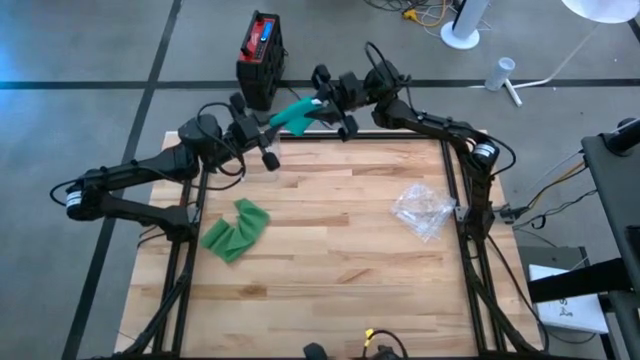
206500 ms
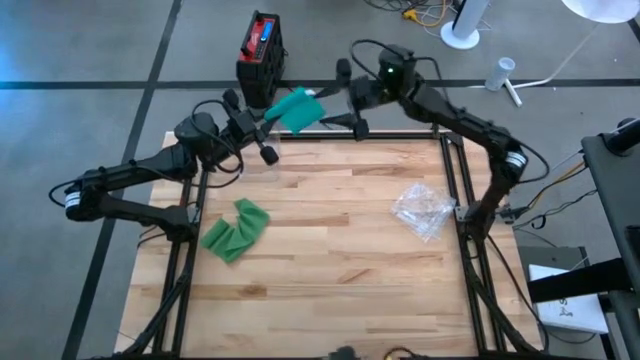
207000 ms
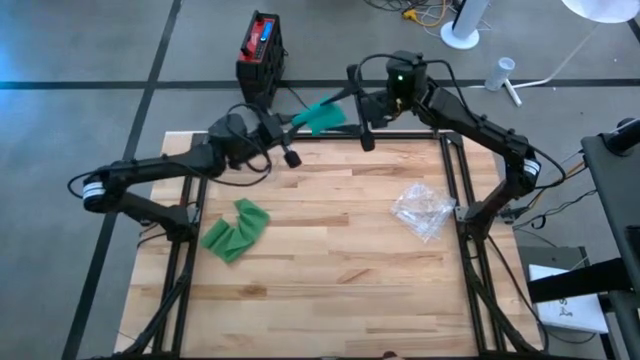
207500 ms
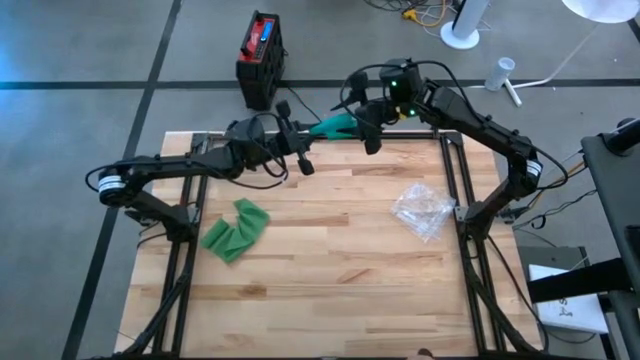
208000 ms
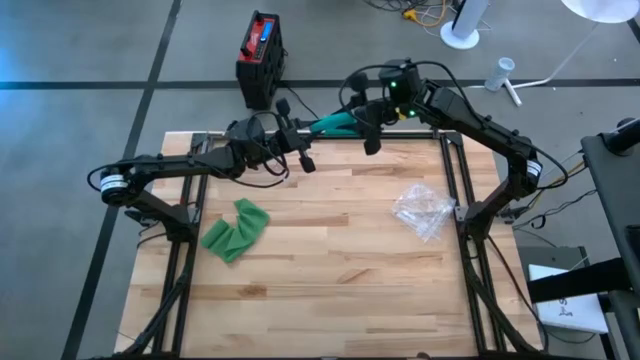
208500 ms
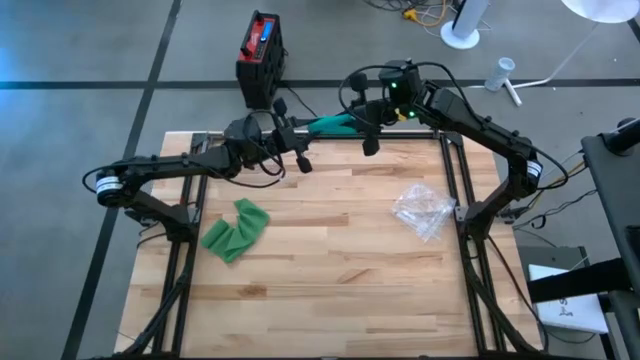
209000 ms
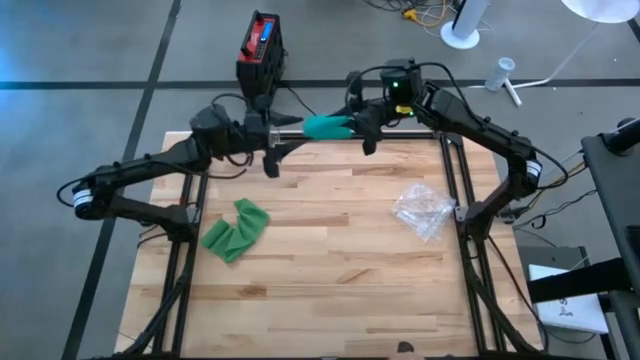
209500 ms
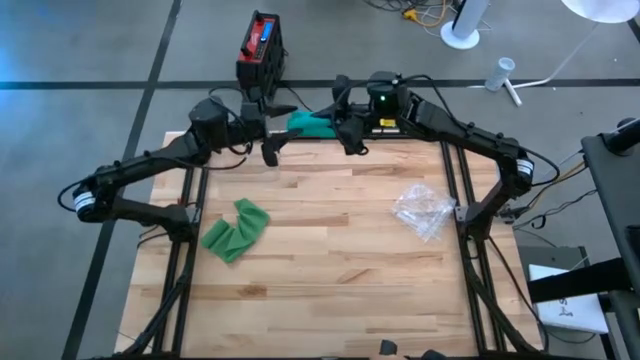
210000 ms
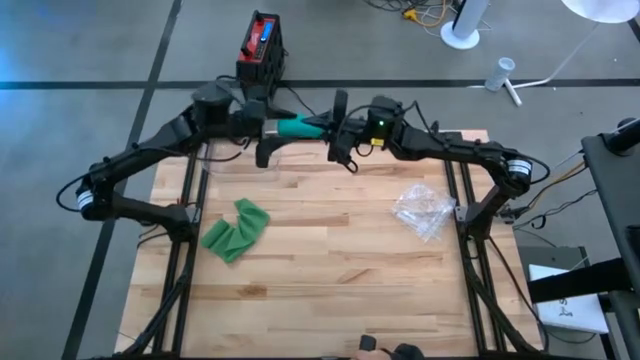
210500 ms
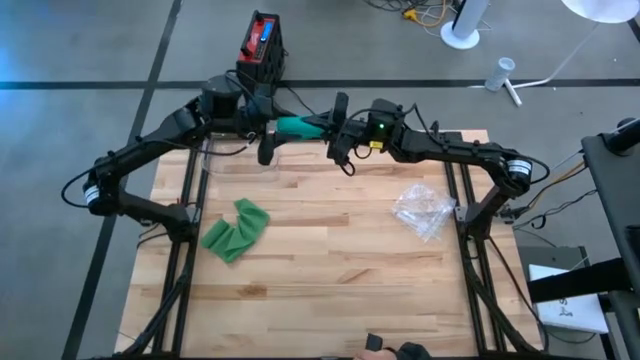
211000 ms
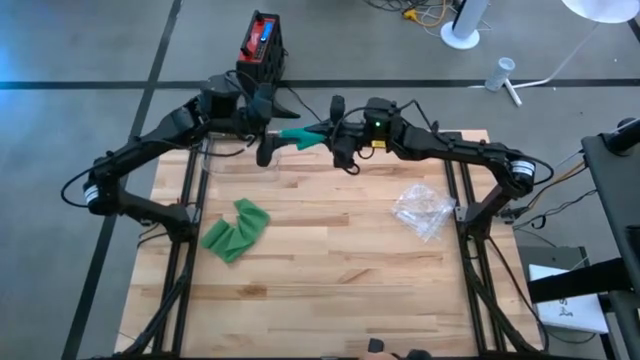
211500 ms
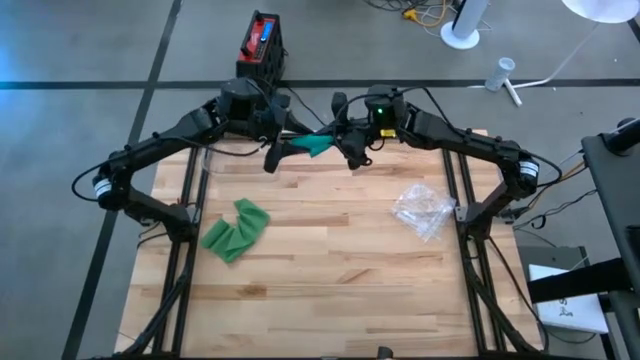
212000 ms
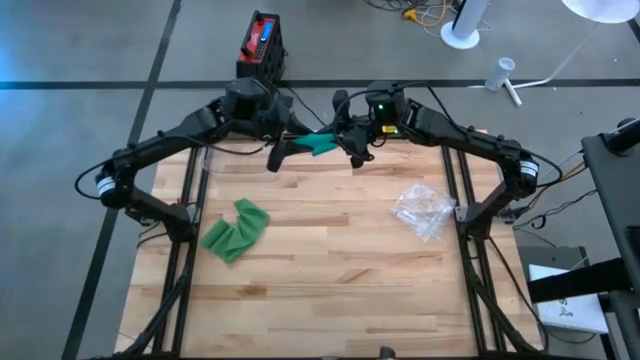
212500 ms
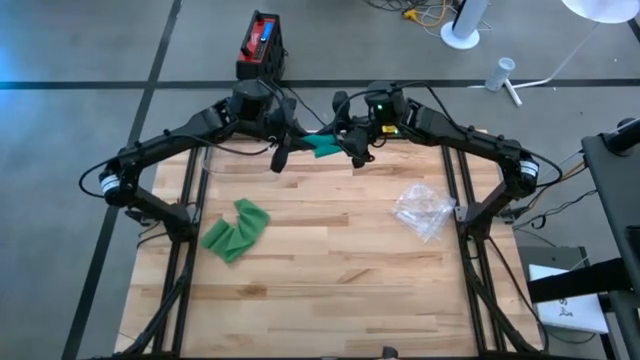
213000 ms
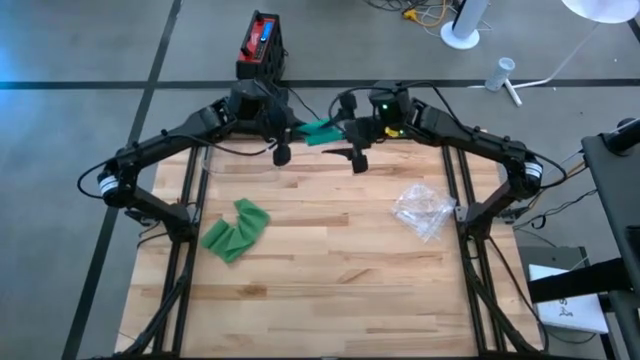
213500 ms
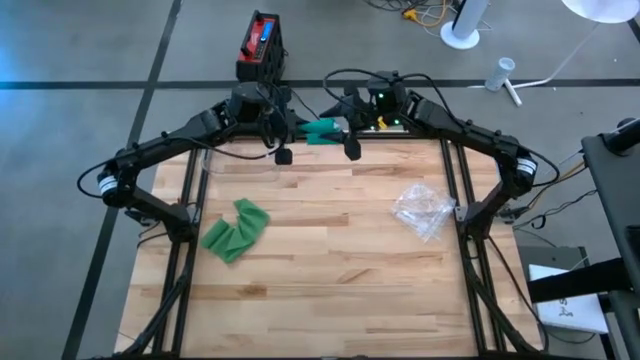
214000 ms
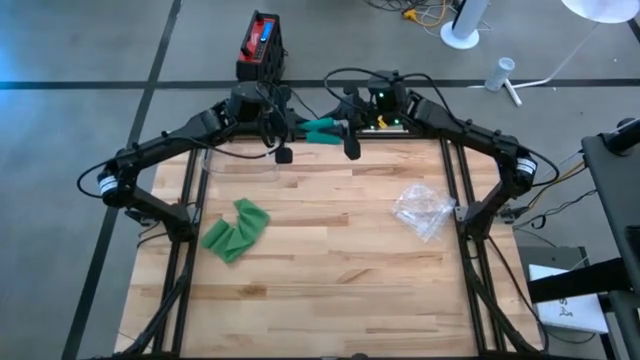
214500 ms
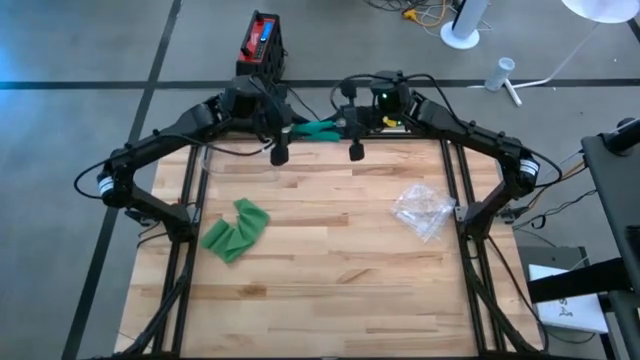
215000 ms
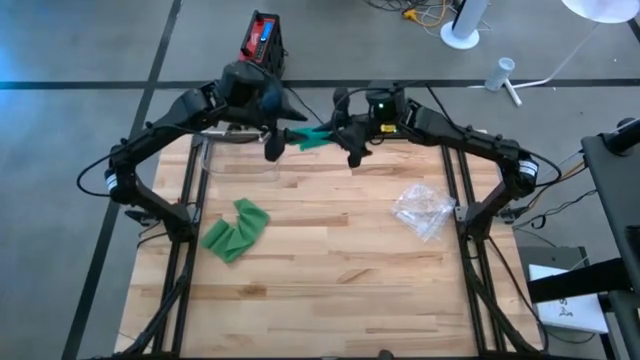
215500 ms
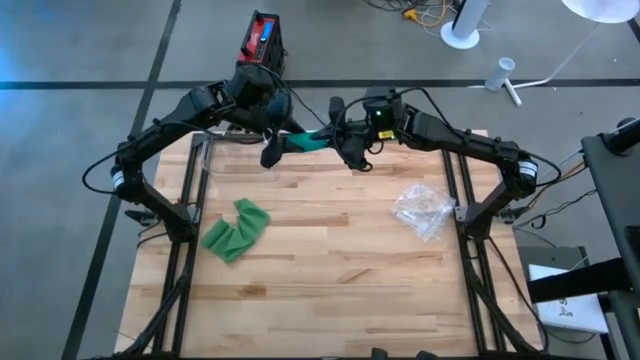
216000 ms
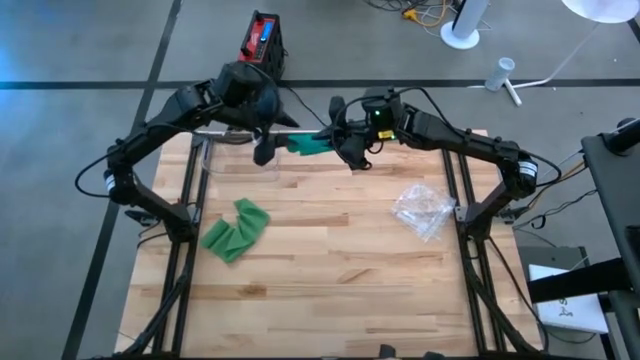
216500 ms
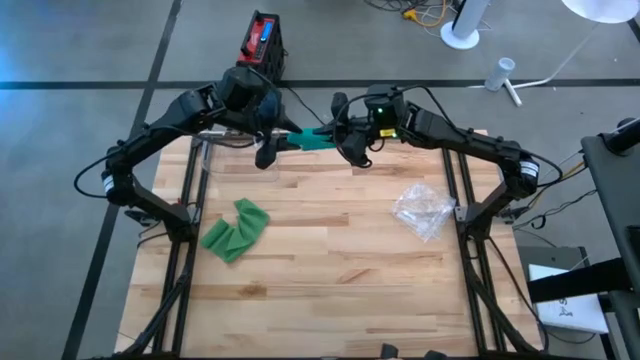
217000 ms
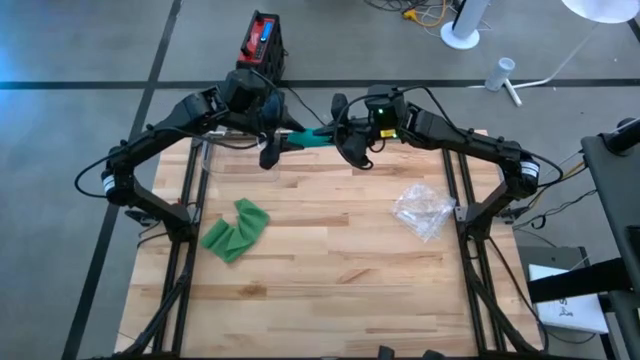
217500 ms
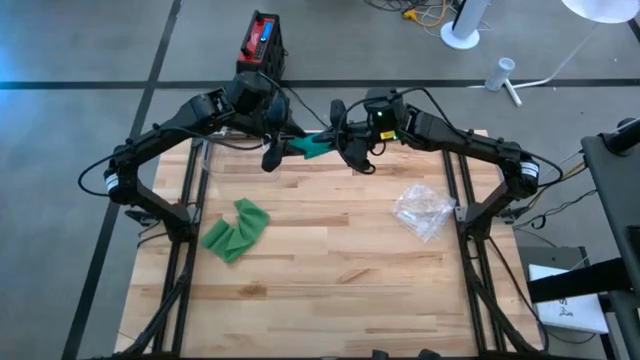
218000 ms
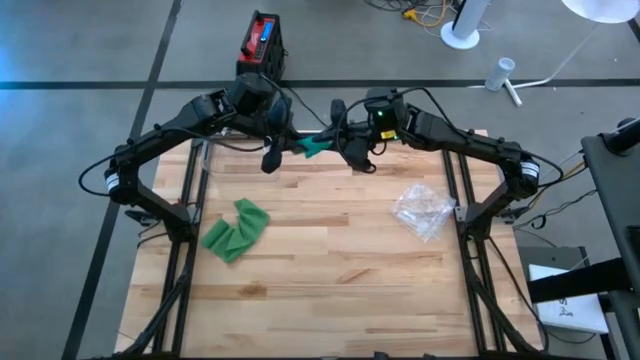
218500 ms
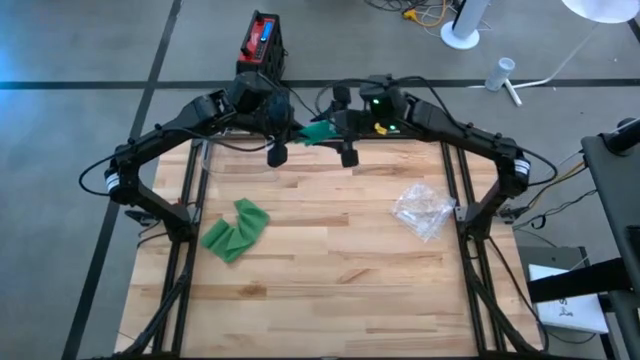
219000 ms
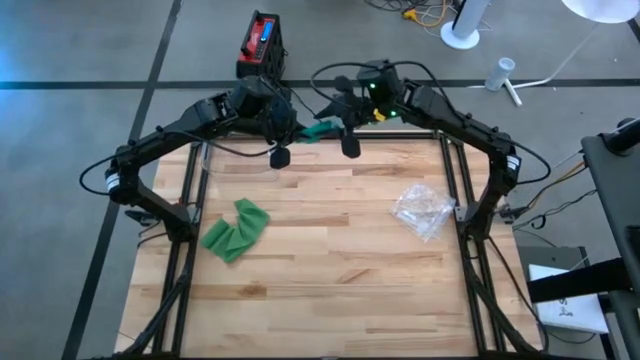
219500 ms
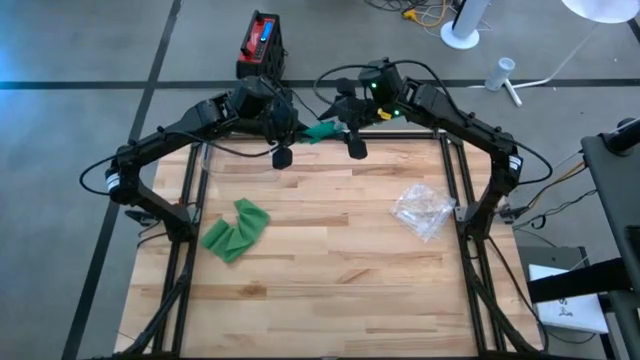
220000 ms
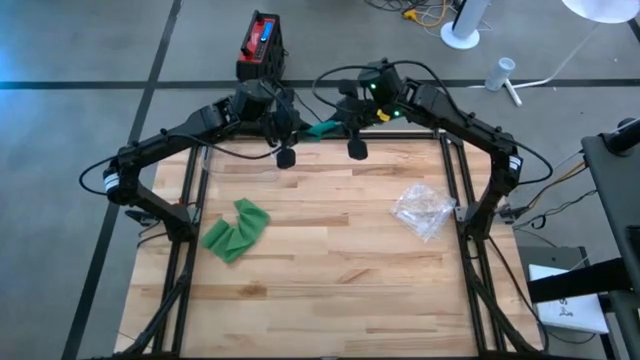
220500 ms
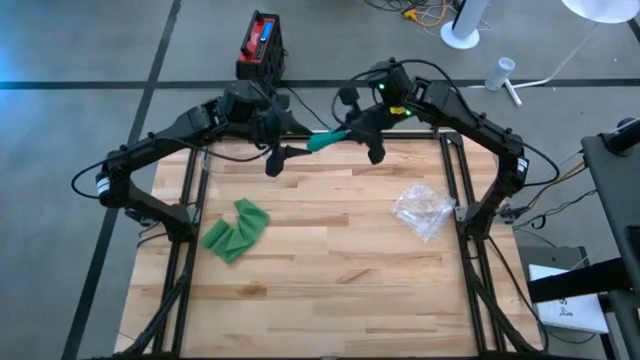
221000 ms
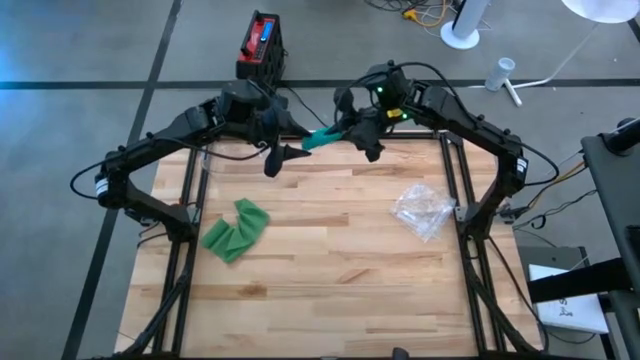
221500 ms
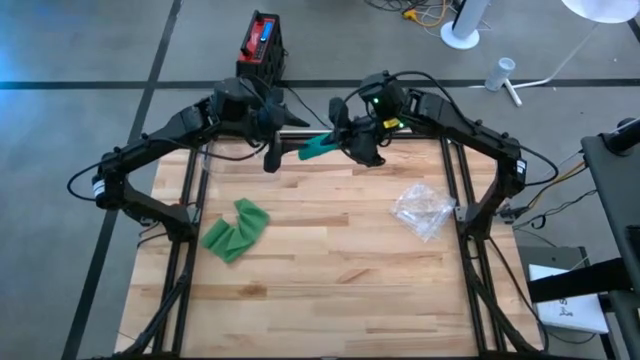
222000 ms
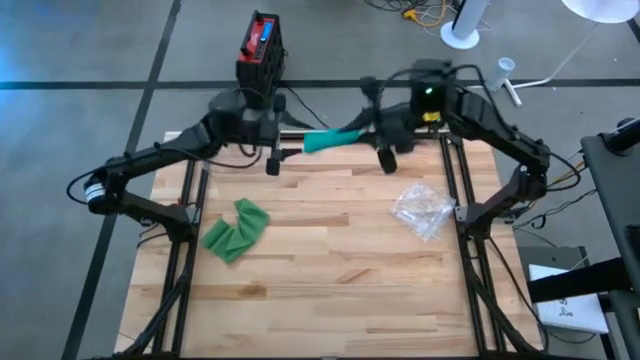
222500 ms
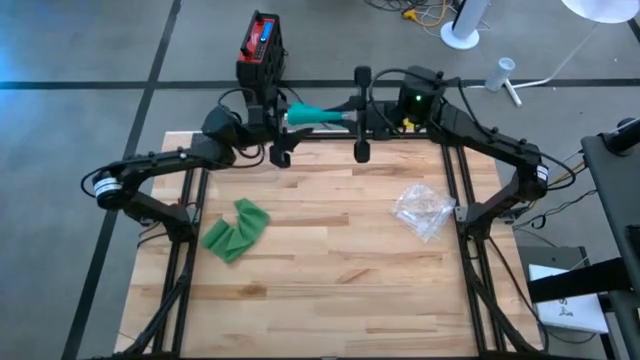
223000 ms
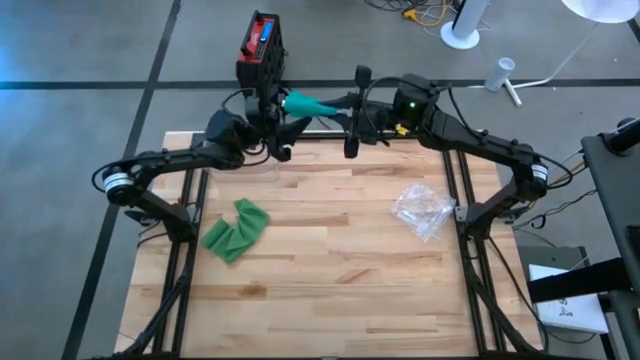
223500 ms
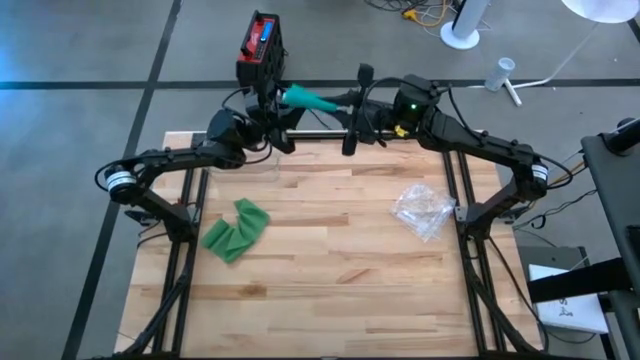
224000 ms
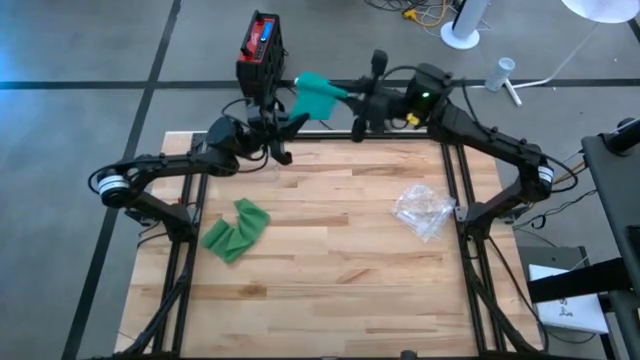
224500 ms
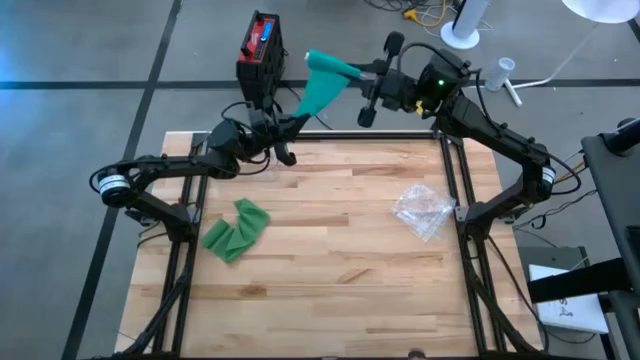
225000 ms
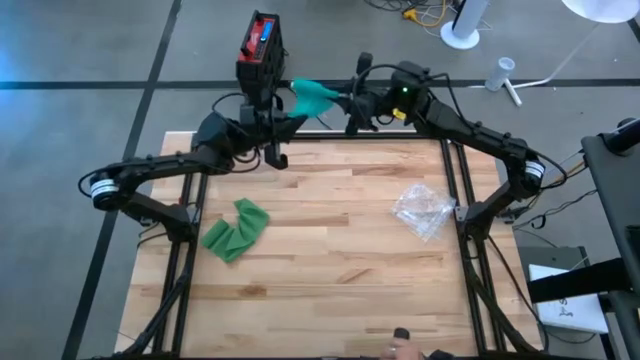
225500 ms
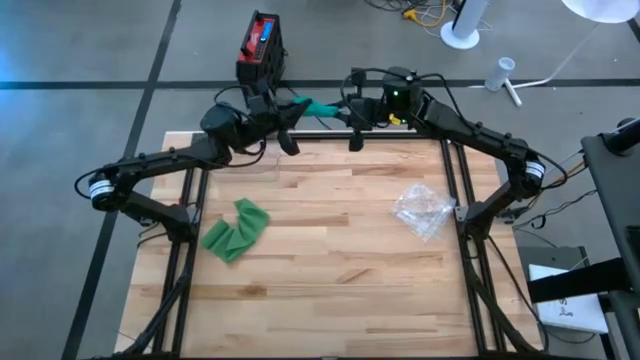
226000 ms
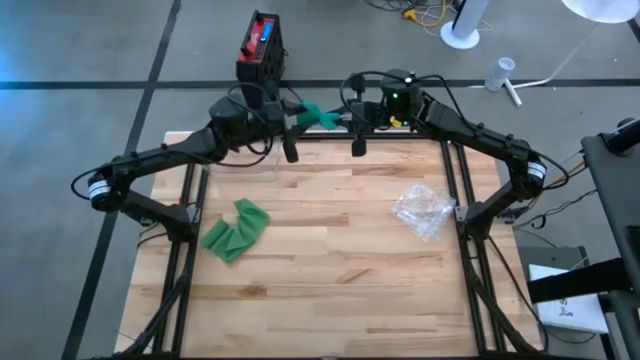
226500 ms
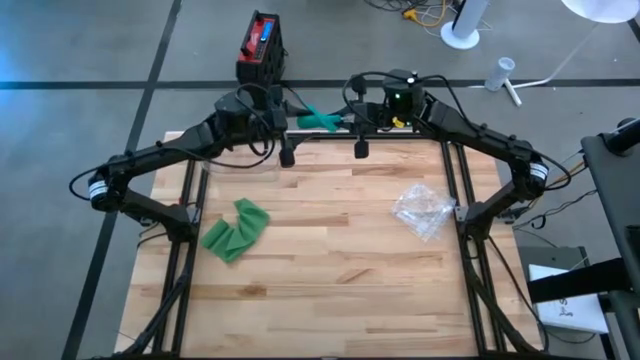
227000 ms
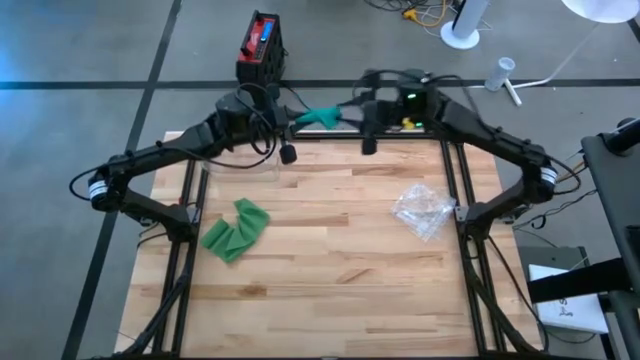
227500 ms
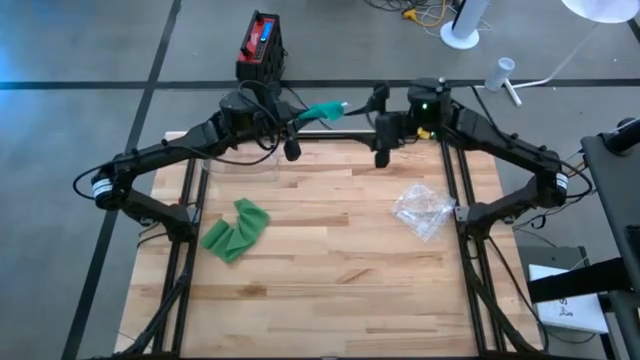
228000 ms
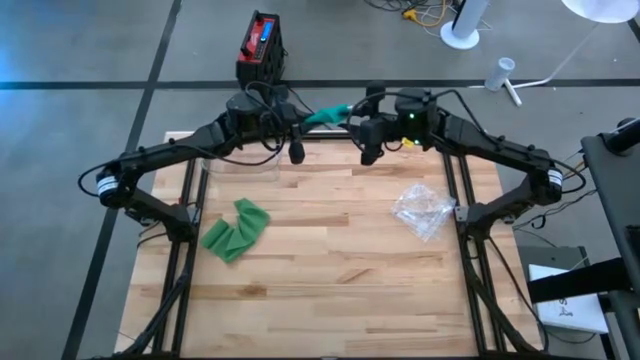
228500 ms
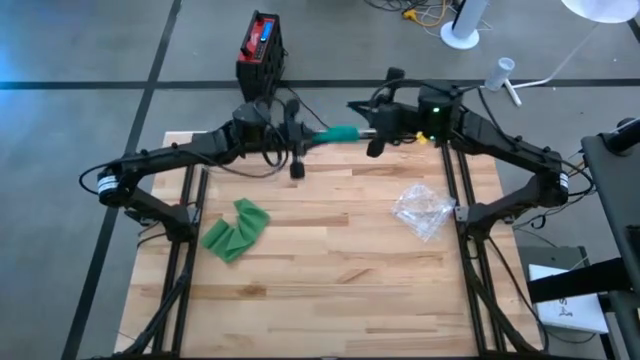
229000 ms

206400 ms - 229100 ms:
Task: Roll bandage
Roll the blue bandage
